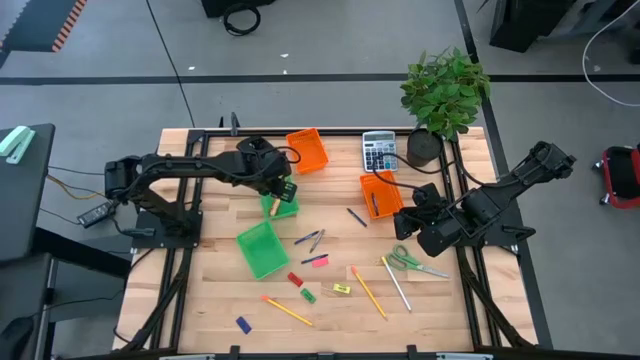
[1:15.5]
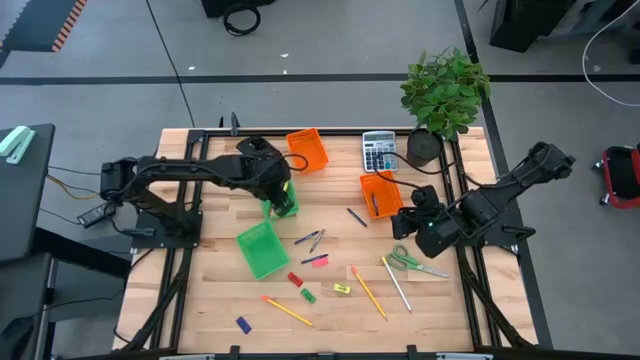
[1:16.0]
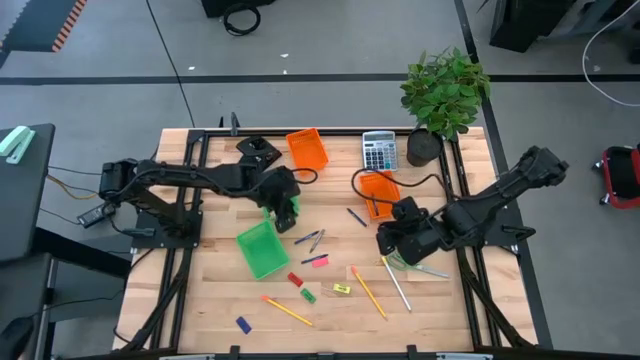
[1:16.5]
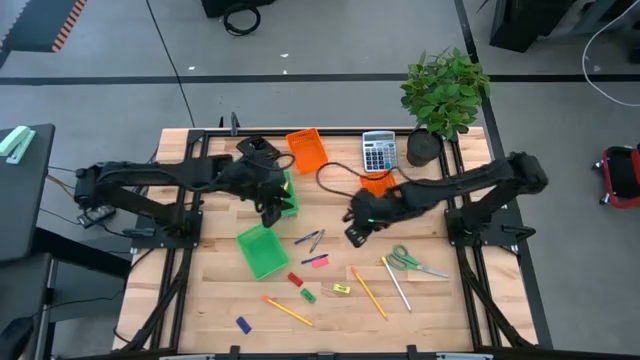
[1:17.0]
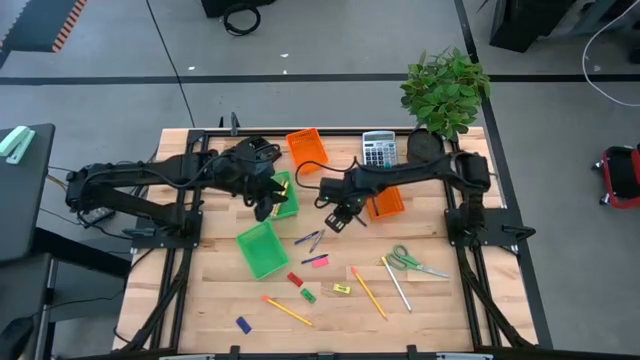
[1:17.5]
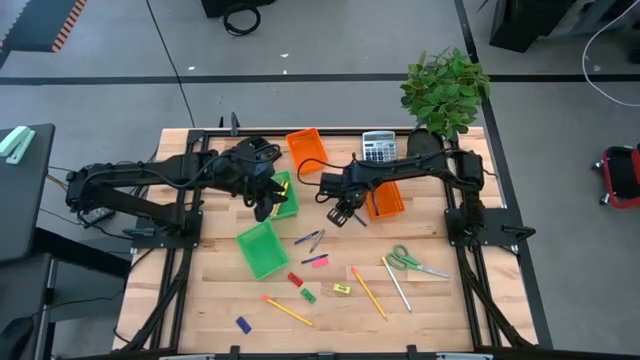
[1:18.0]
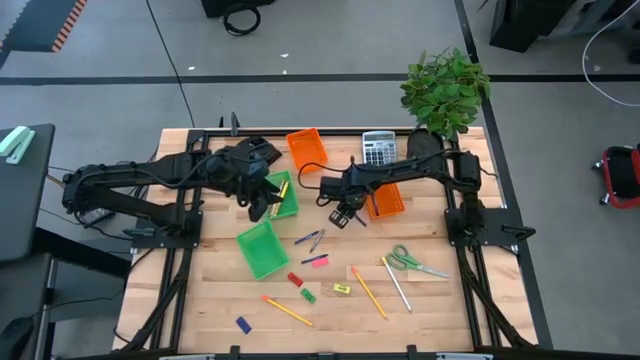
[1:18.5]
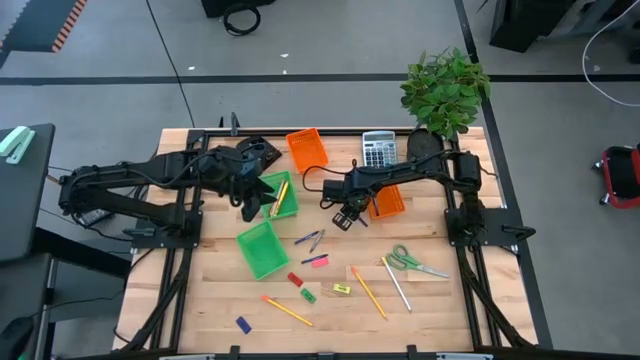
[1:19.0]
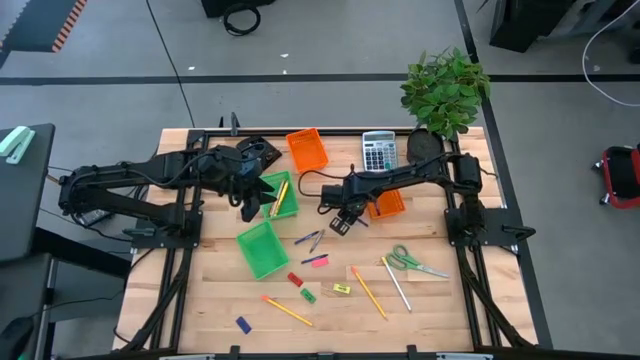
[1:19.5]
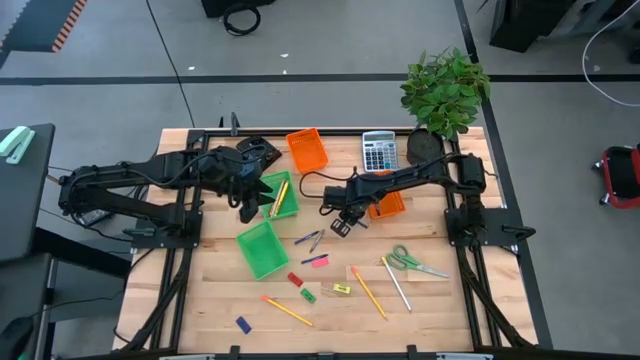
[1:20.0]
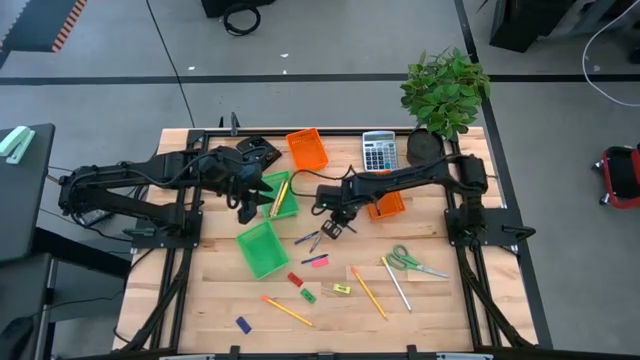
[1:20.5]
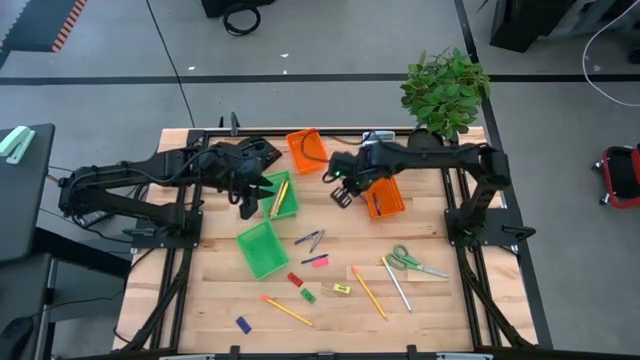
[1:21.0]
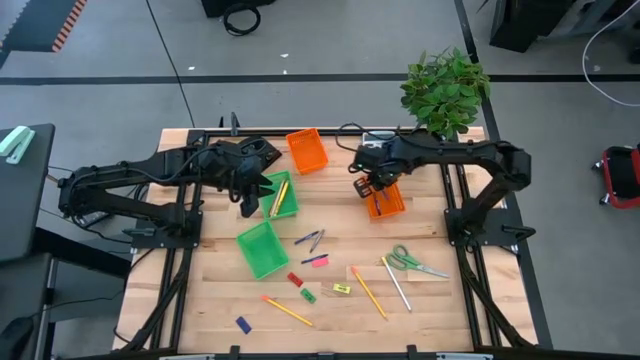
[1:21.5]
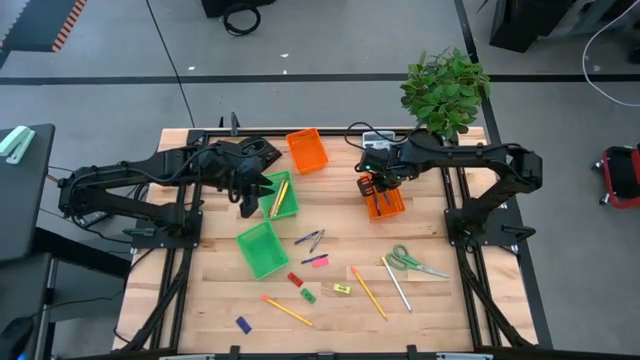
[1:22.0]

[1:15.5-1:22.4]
Task: Sort crayons/erasers/pens/pencils in bins
Put the top blue crayon into the bottom orange bin

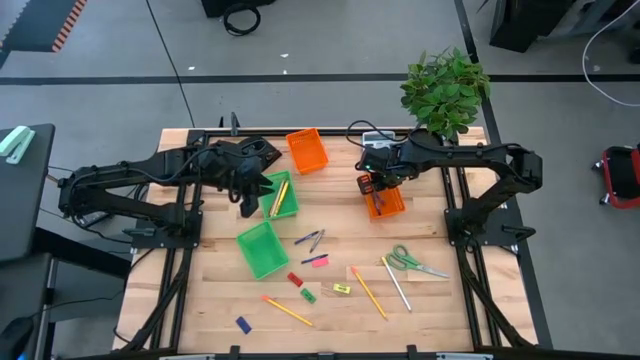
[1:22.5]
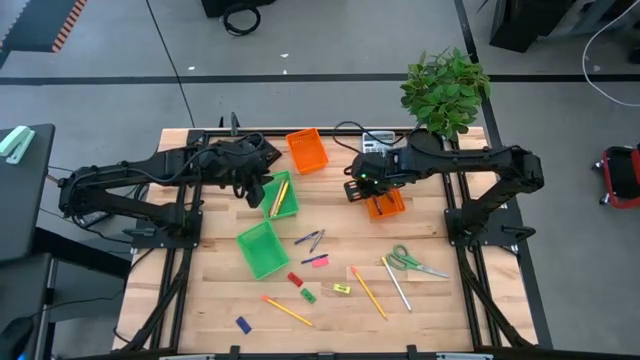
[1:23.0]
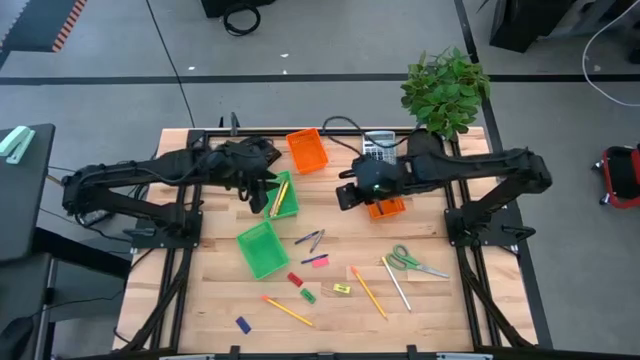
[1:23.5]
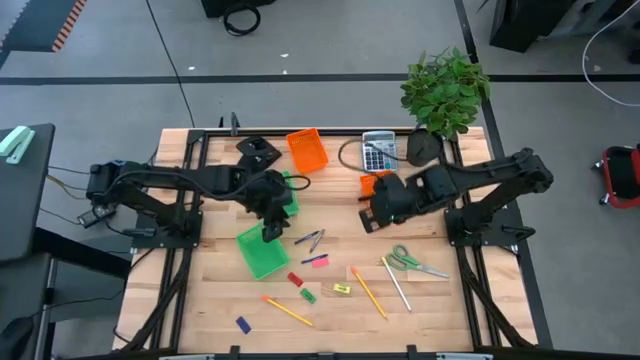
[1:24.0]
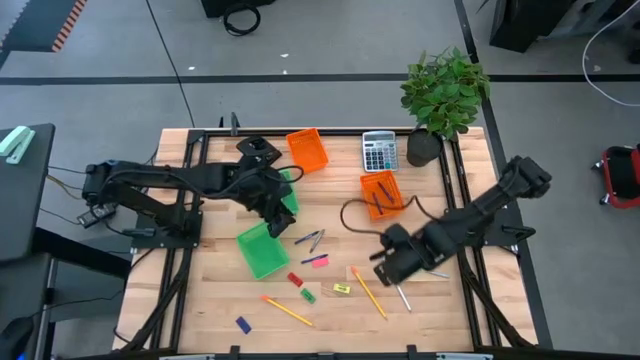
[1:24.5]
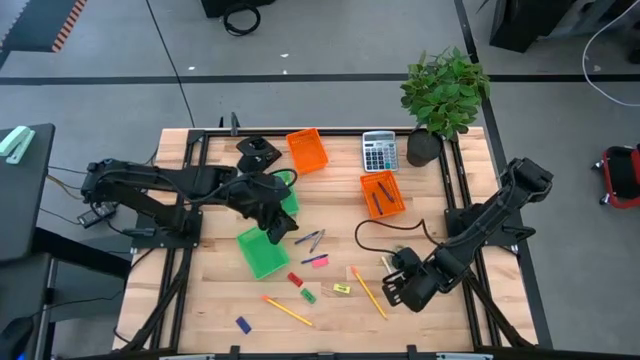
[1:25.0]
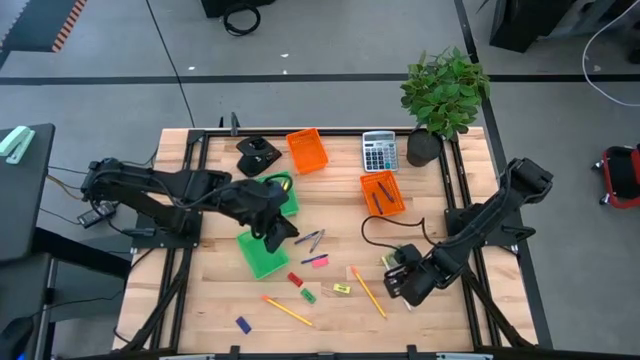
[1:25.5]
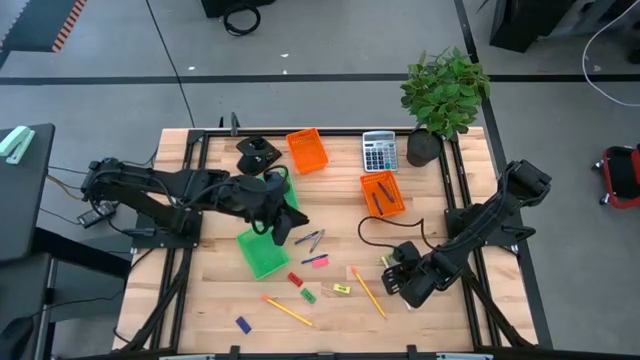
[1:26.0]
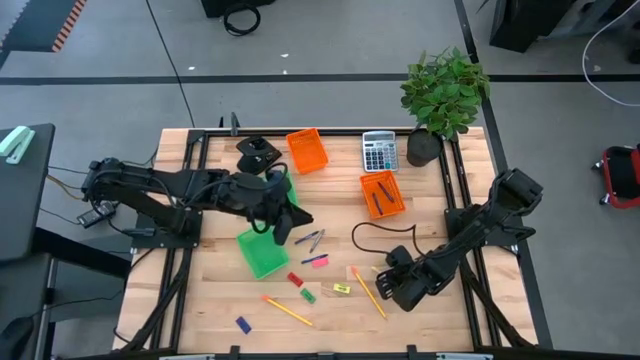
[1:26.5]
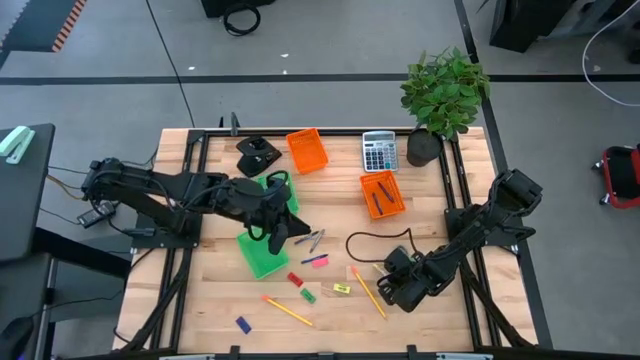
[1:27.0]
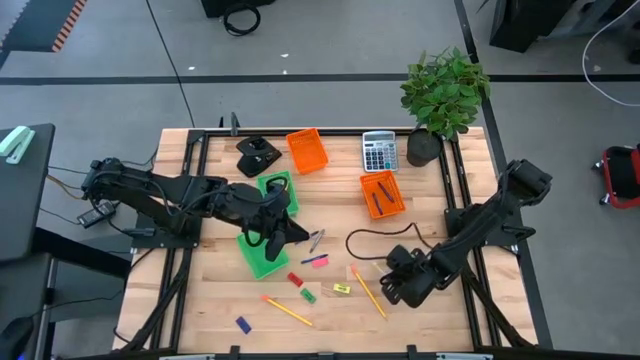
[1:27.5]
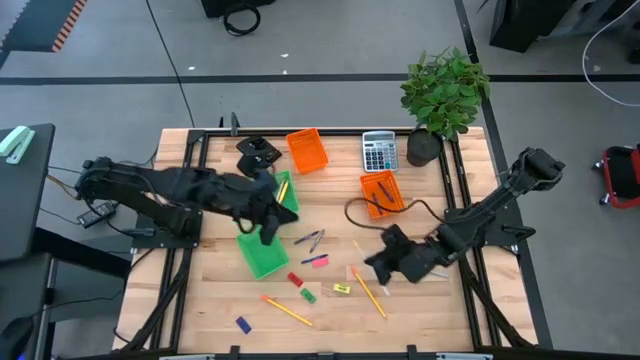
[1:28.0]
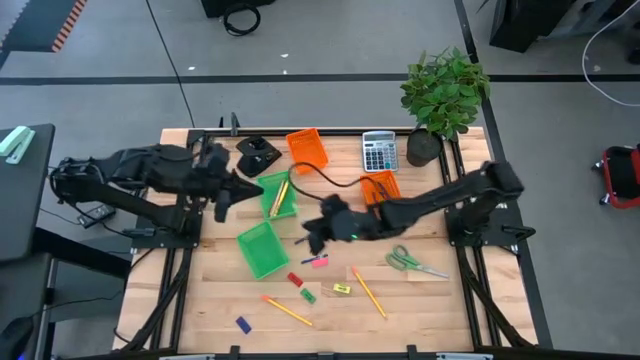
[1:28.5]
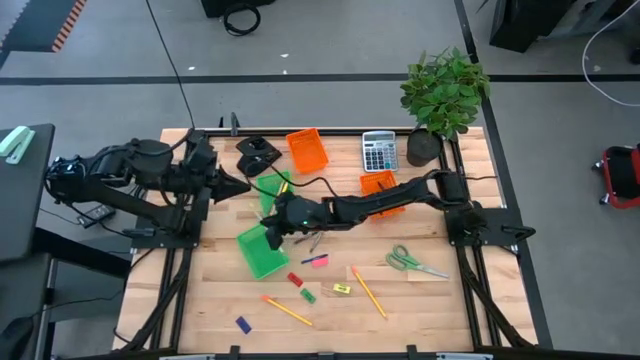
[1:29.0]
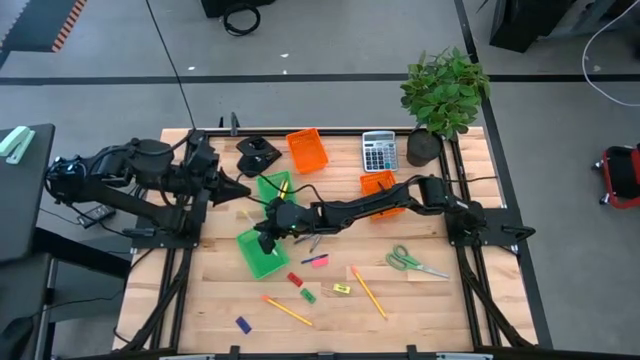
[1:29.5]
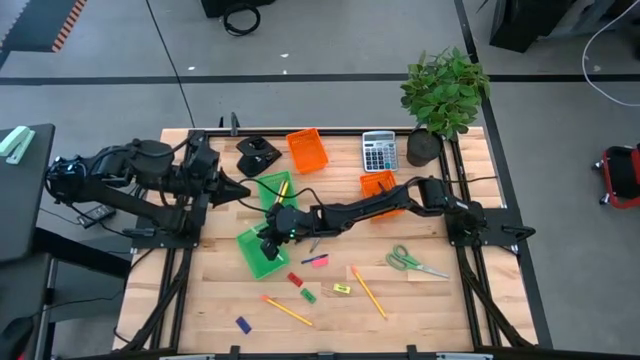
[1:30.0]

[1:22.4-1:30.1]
Put the white pencil into the bottom green bin

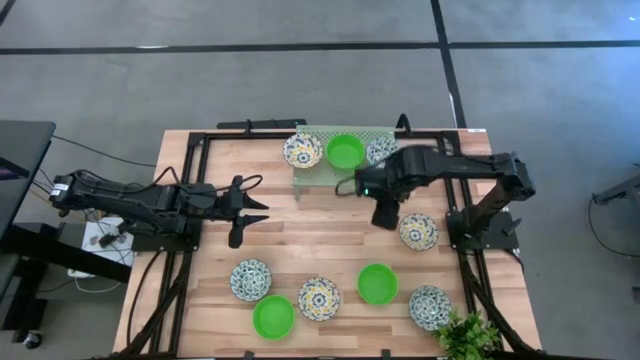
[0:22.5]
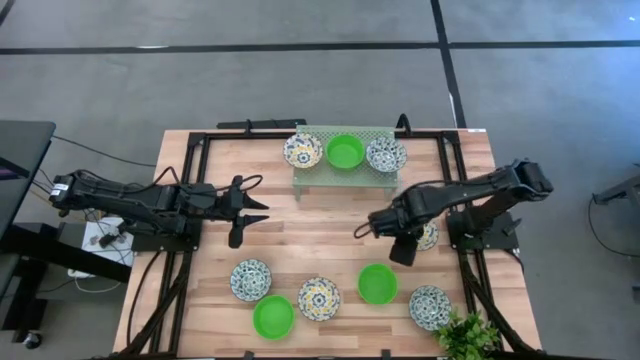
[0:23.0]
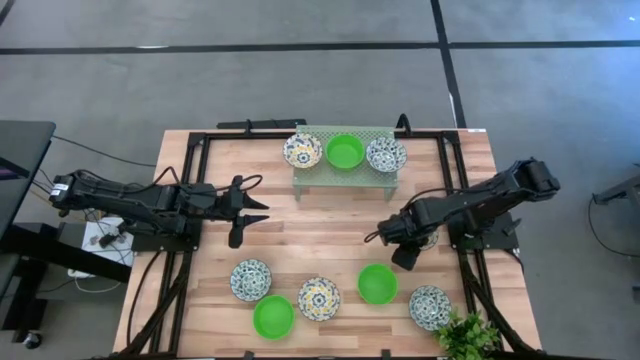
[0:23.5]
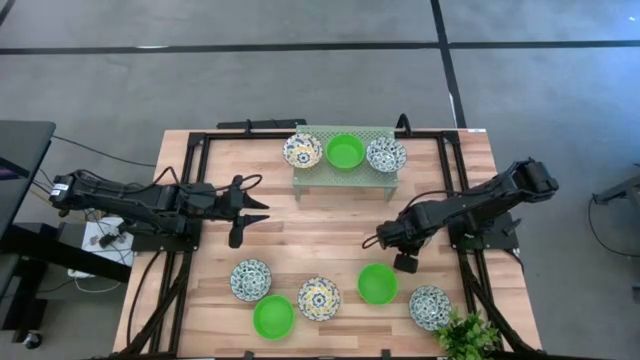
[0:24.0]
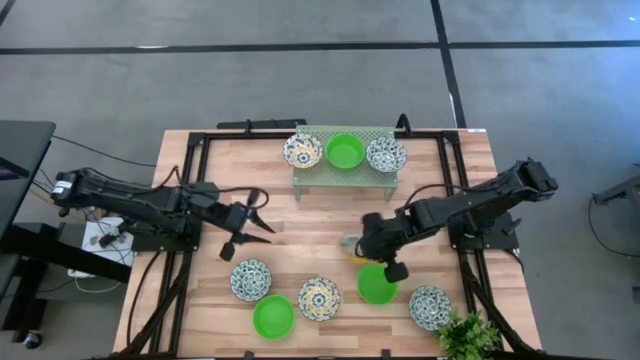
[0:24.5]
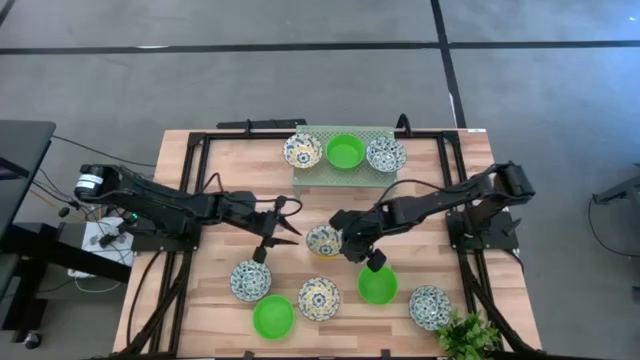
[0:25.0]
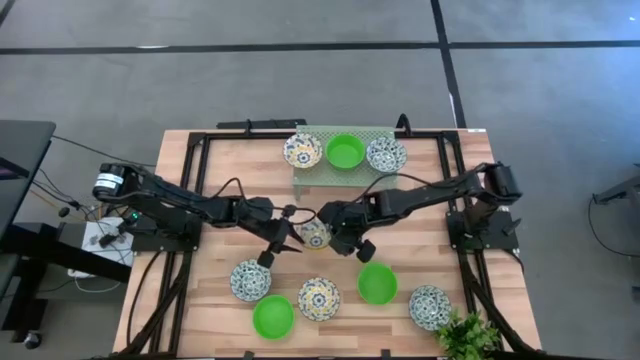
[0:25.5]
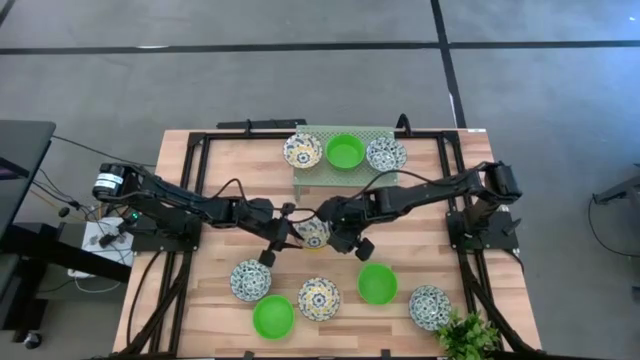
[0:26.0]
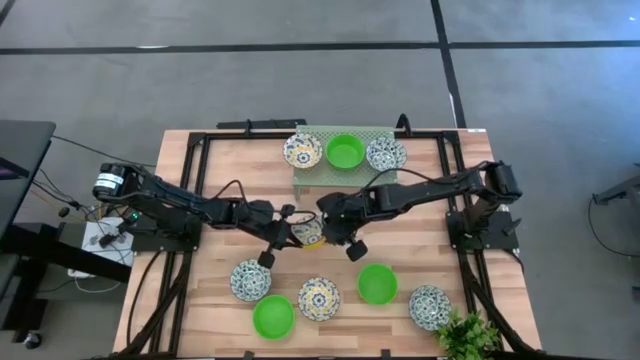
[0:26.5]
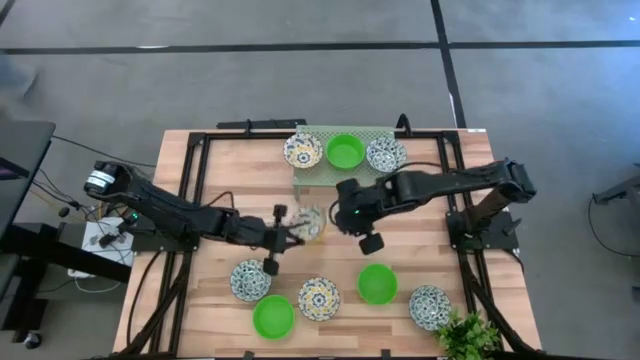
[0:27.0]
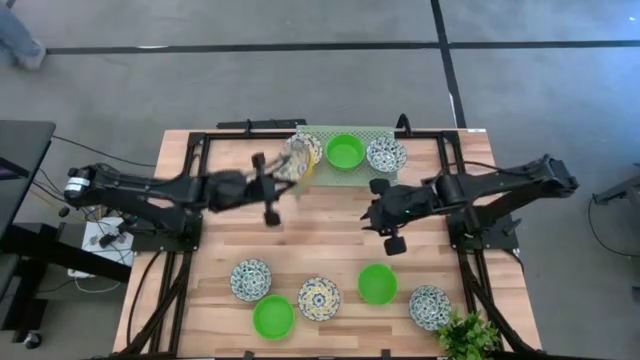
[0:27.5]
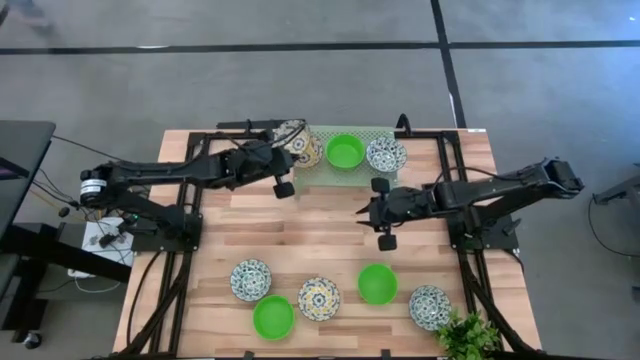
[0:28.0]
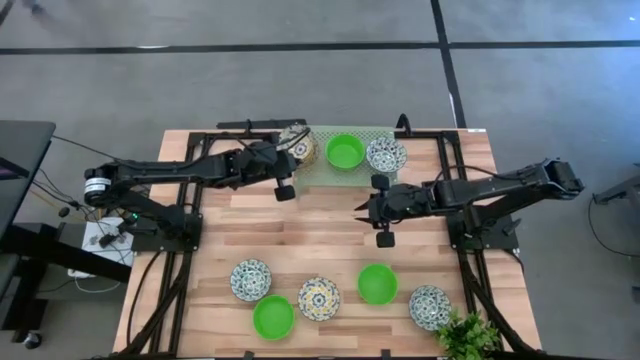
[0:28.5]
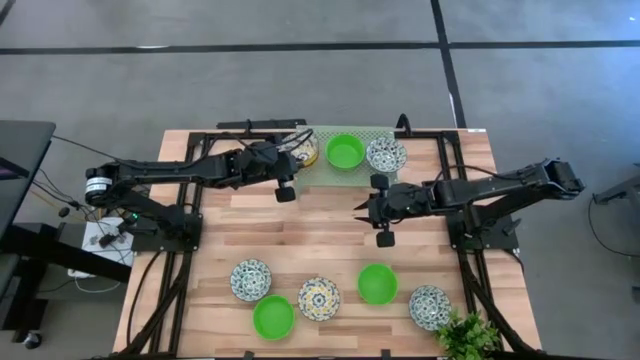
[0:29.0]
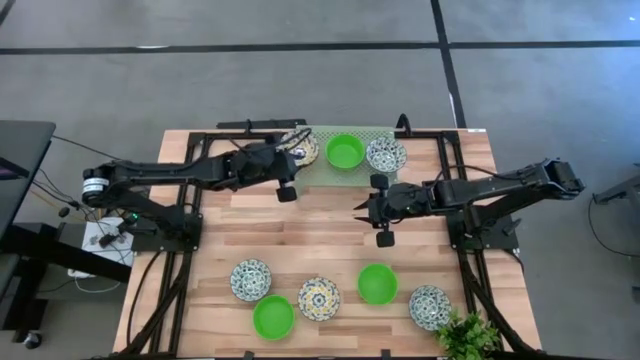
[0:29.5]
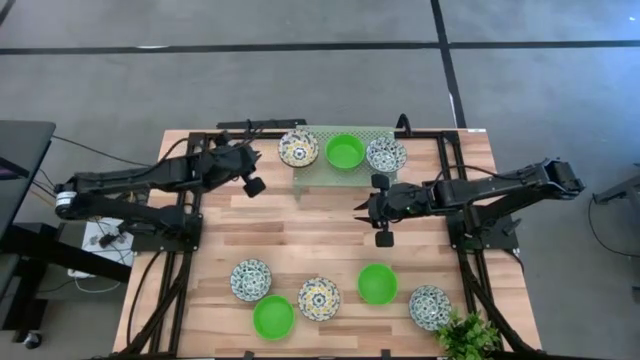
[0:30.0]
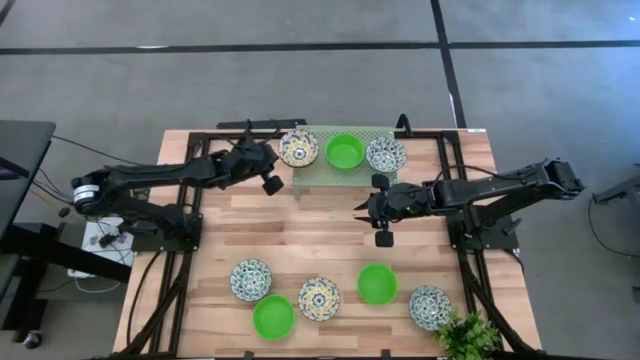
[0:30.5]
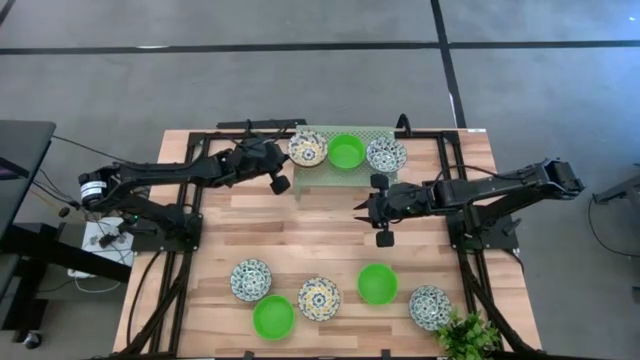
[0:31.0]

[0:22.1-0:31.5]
Task: Pick & Place Mini bowls
Stack the top yellow bowl on the yellow bowl on the shelf
